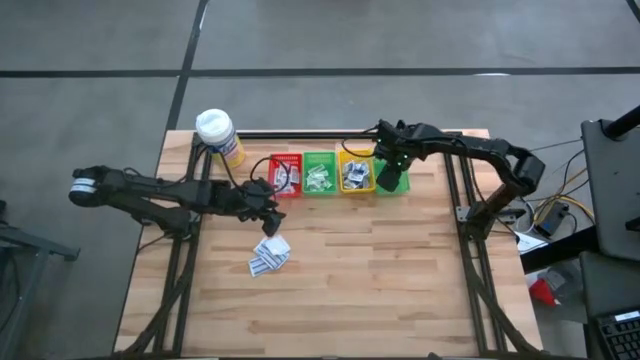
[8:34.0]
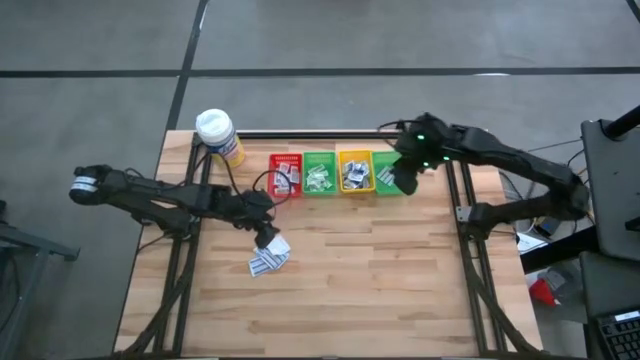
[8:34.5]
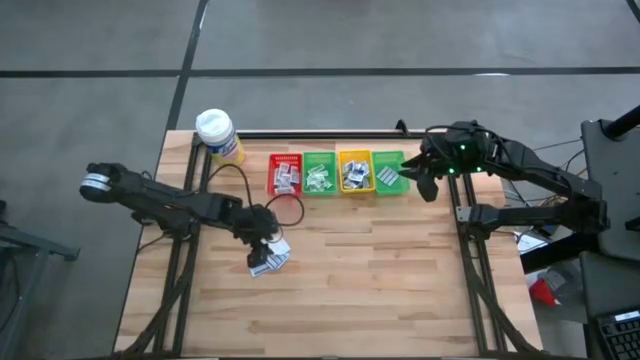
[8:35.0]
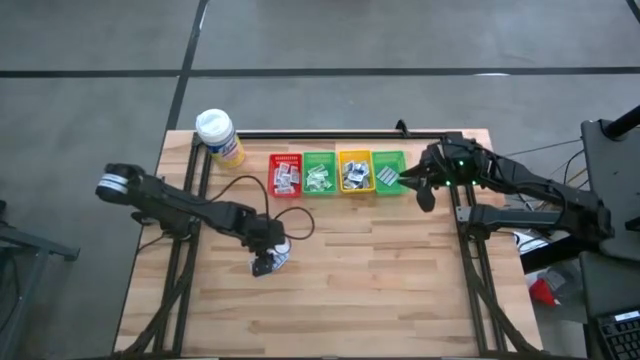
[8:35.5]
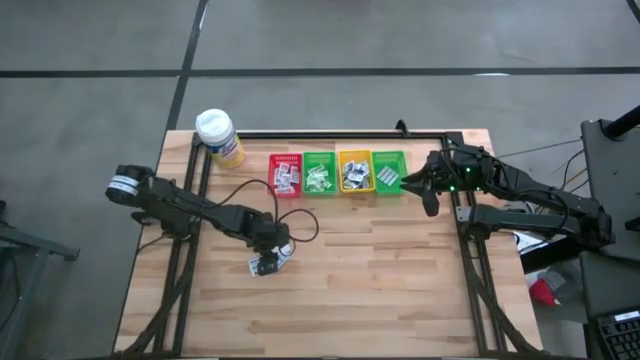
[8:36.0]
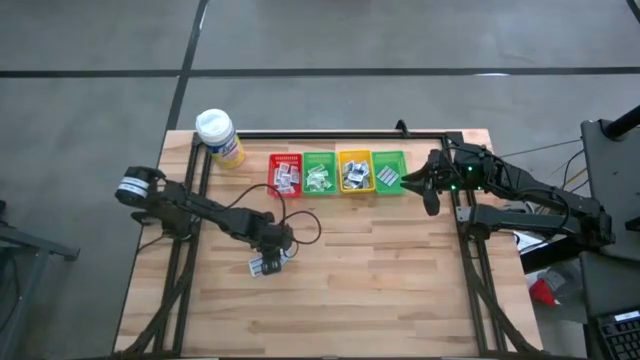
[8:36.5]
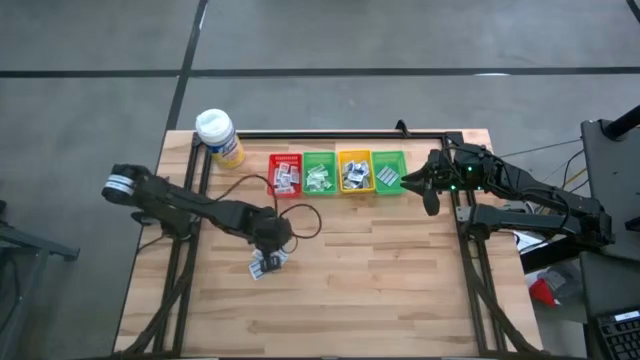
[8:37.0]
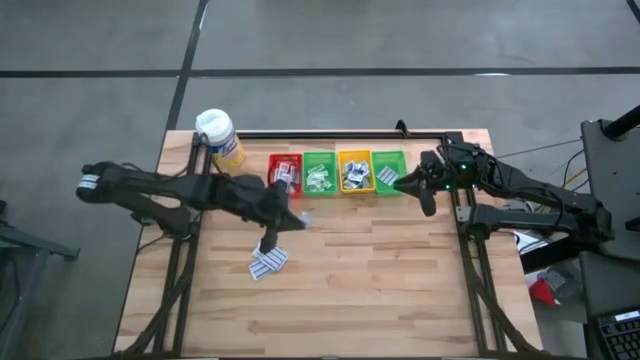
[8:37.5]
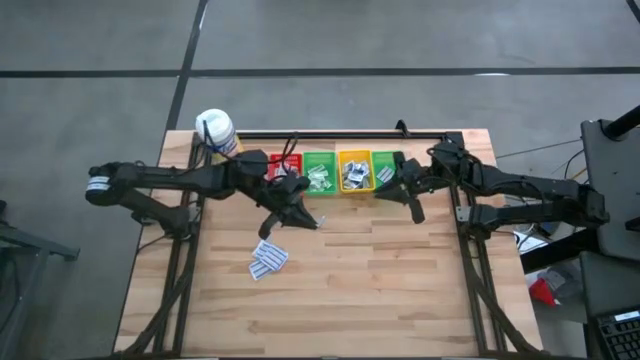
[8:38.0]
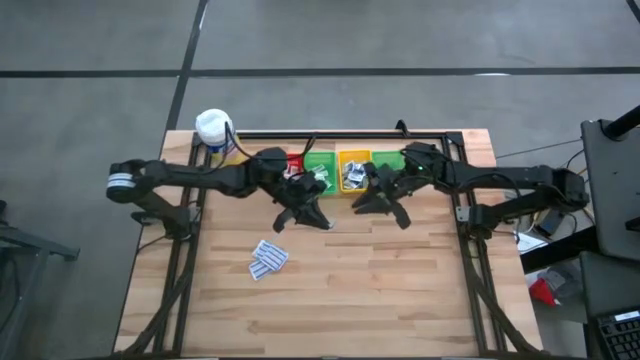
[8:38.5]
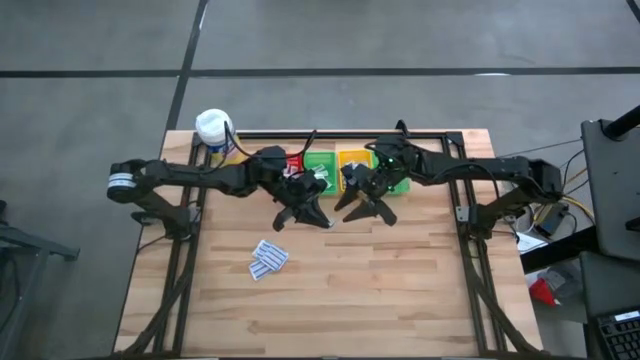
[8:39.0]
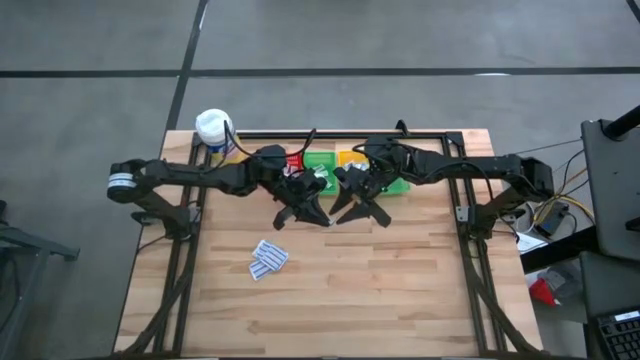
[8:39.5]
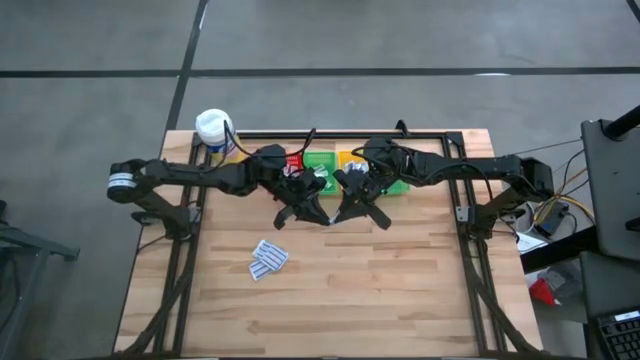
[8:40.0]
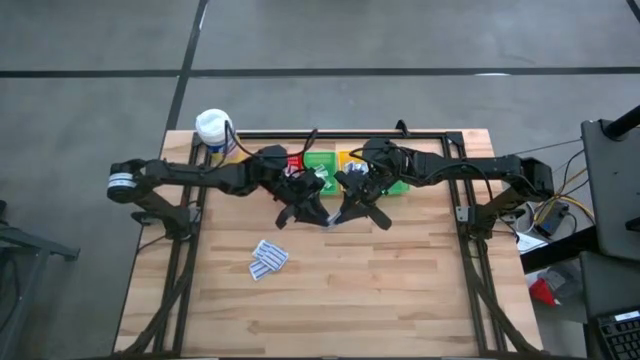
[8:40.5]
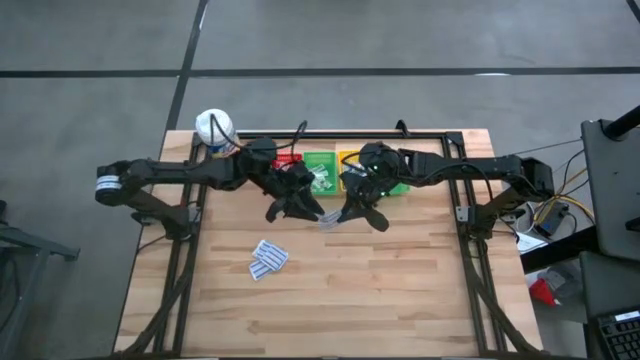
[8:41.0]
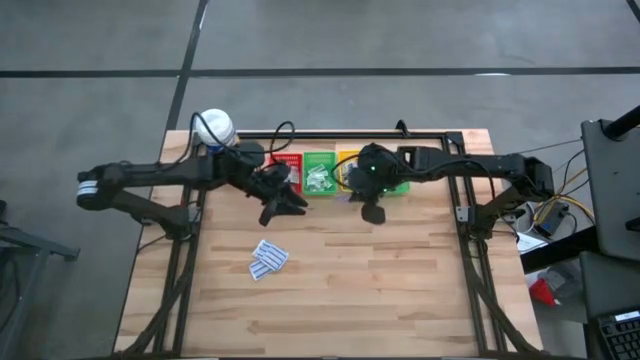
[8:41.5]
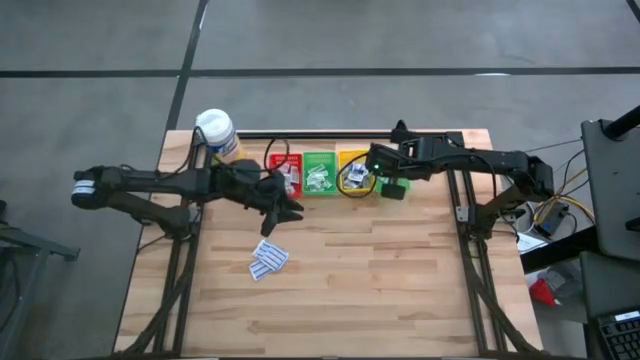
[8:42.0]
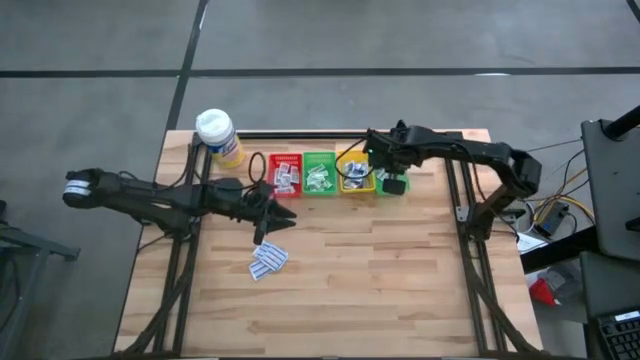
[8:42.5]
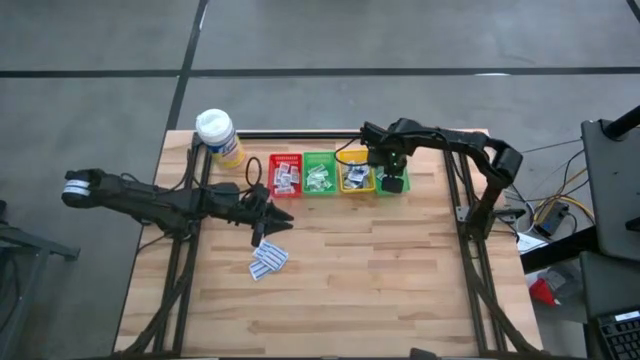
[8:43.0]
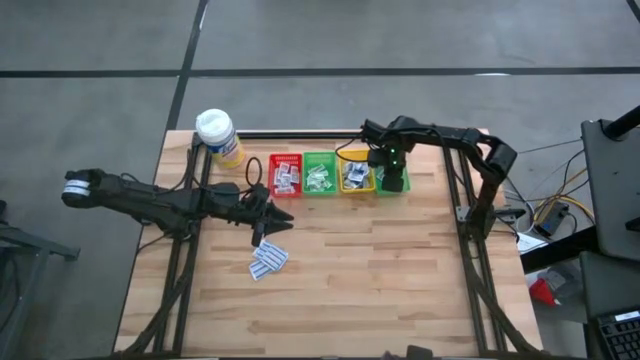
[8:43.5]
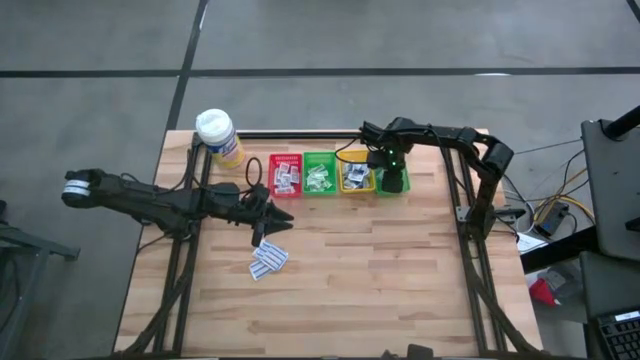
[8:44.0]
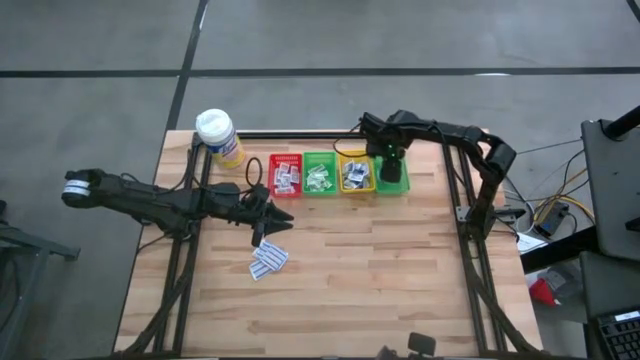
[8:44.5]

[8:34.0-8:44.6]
Task: Pick & Place First Aid Supplies
Put the blue fingertip bandage into the right green bin

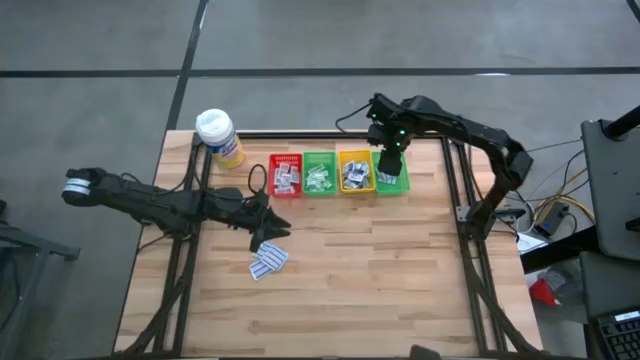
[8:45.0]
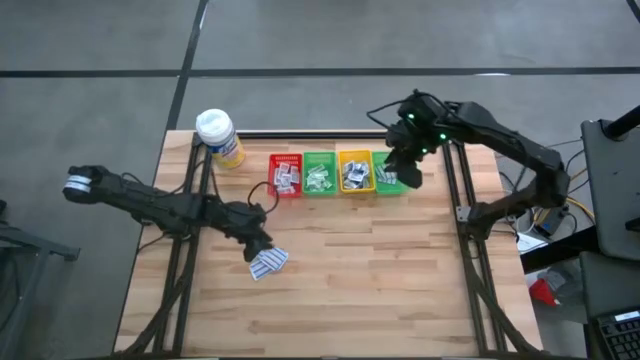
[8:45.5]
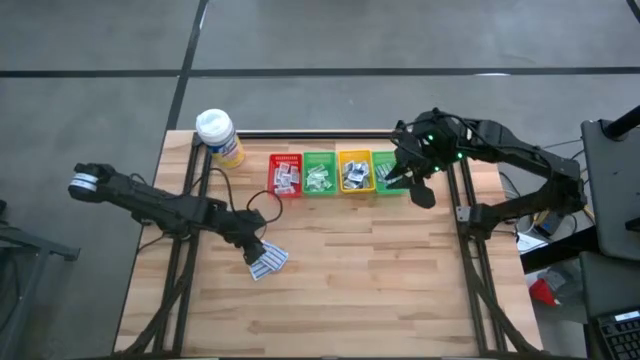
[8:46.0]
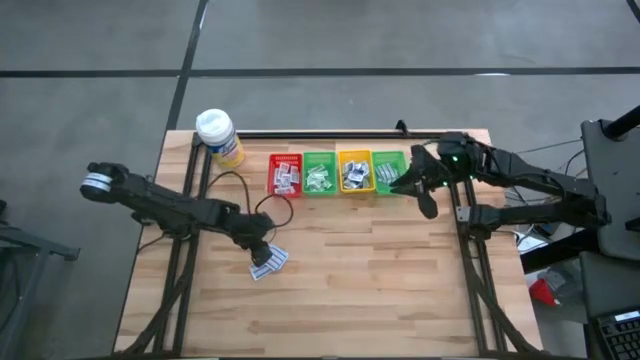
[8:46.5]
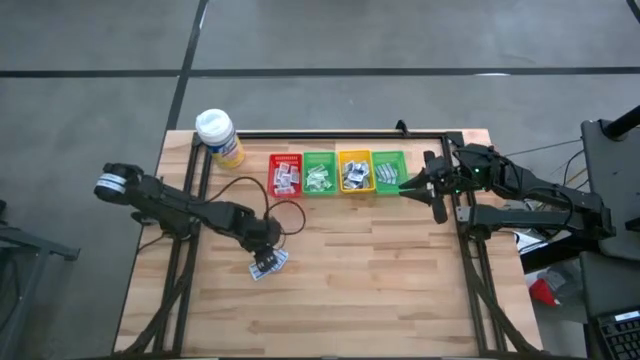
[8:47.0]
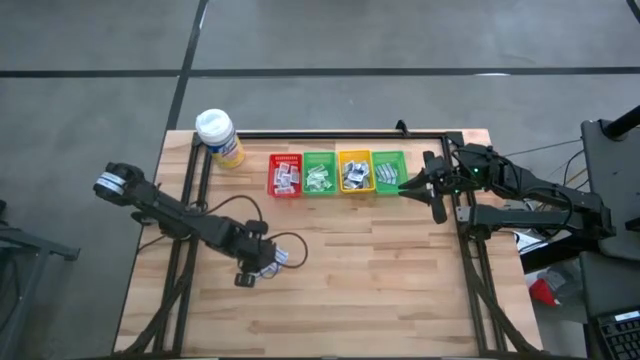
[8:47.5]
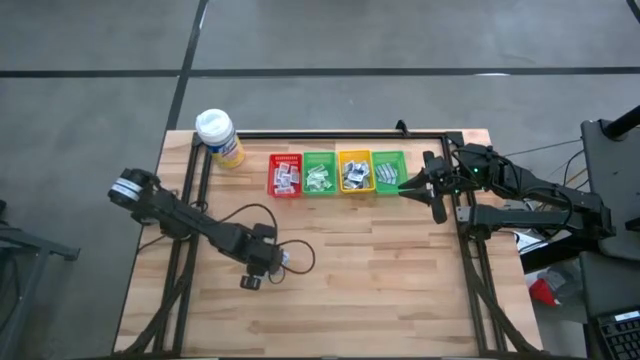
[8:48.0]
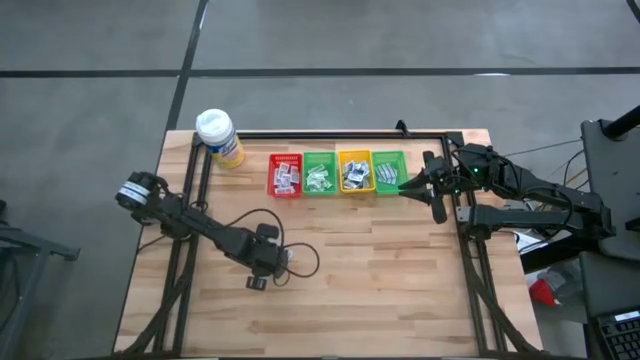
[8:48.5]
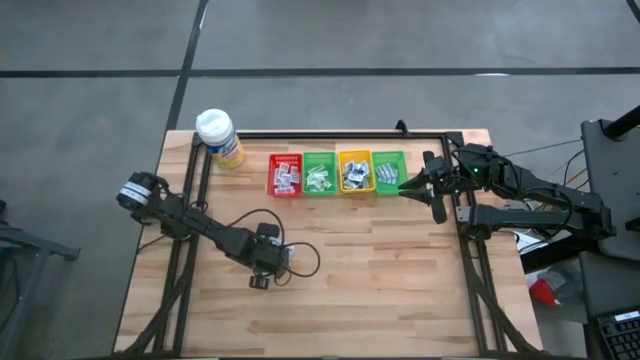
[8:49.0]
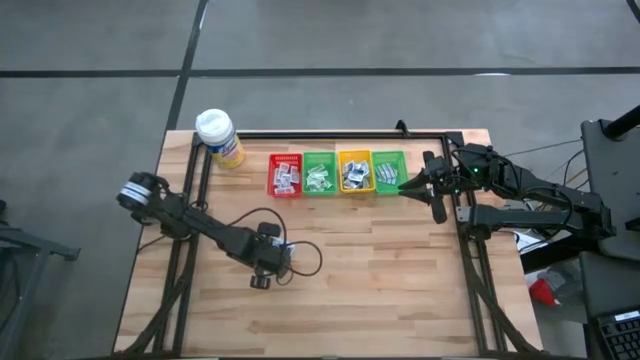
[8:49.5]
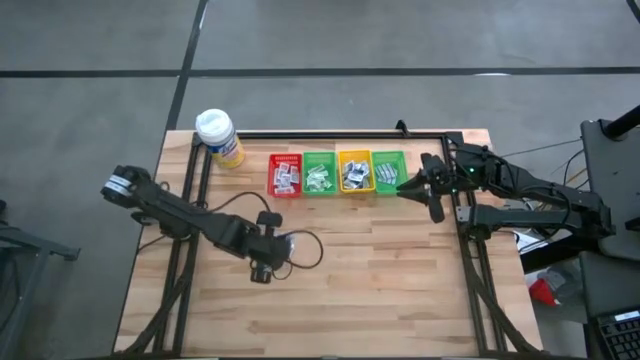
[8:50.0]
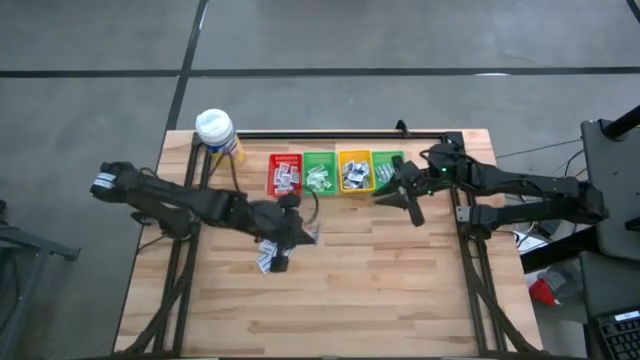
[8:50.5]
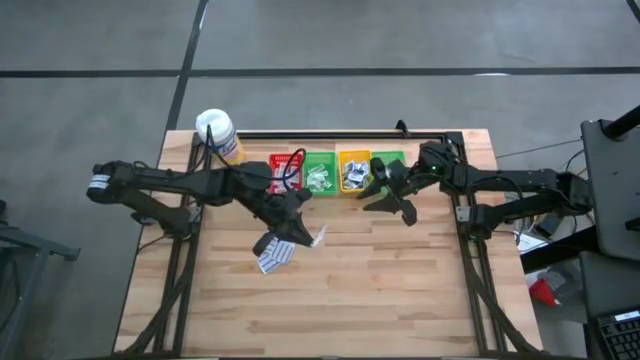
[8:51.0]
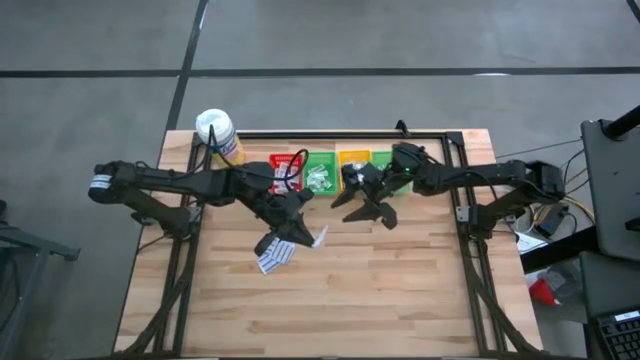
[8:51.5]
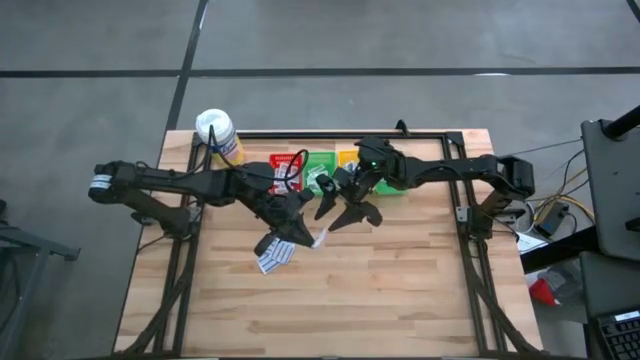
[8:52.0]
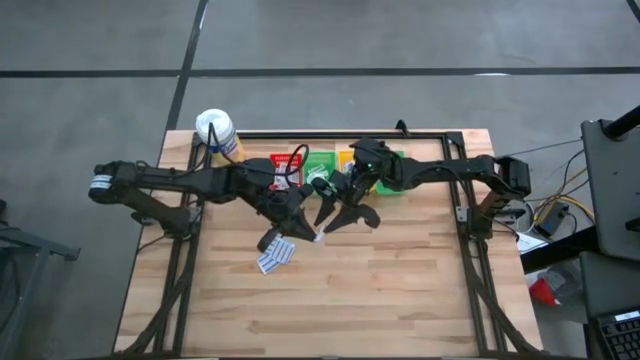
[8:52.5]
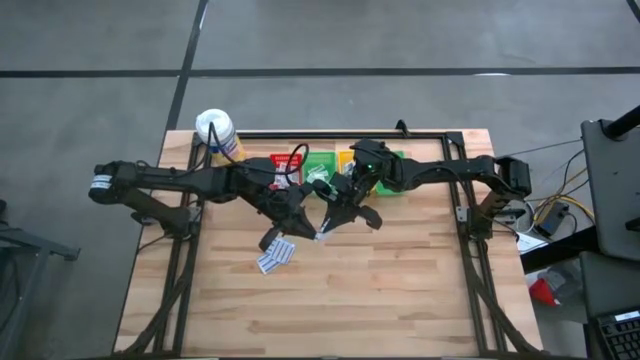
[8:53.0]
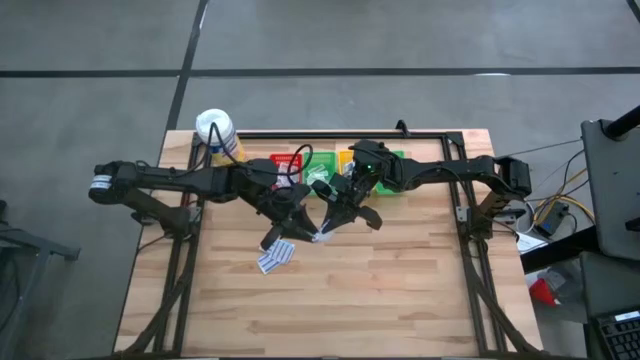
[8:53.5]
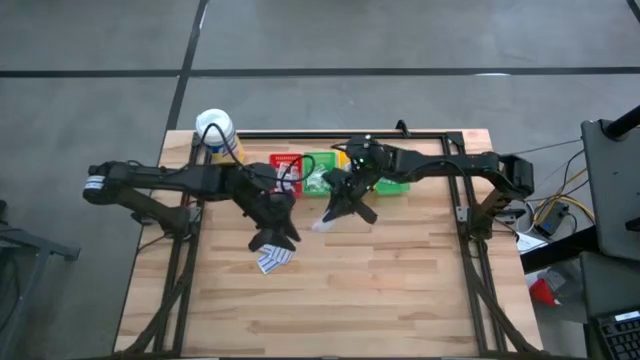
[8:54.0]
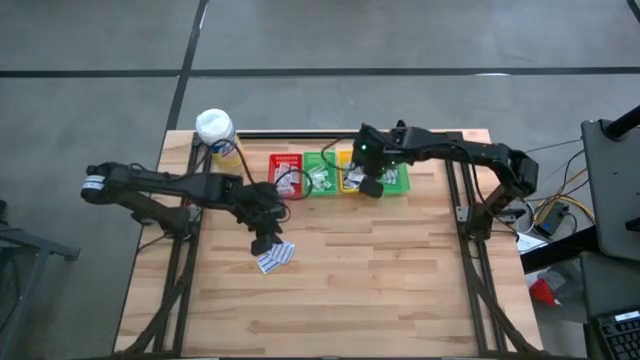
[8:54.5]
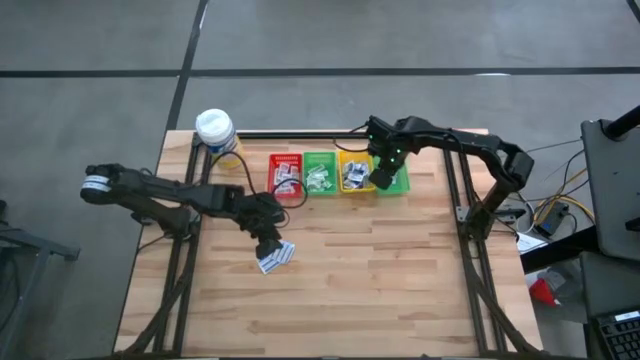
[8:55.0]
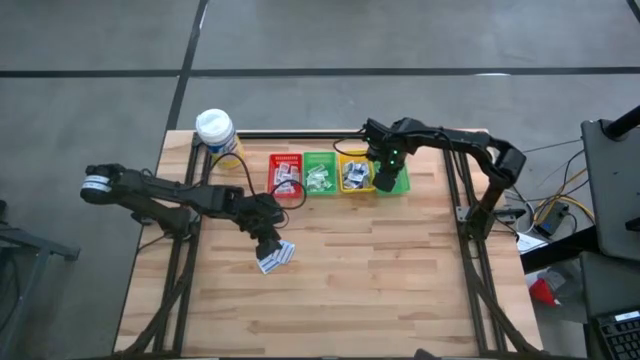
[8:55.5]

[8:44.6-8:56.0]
Put the blue fingertip bandage into the right green bin
